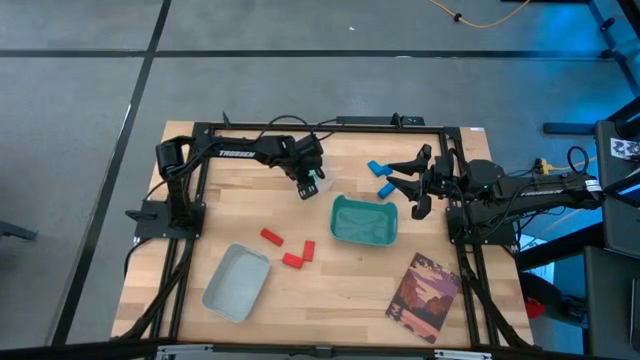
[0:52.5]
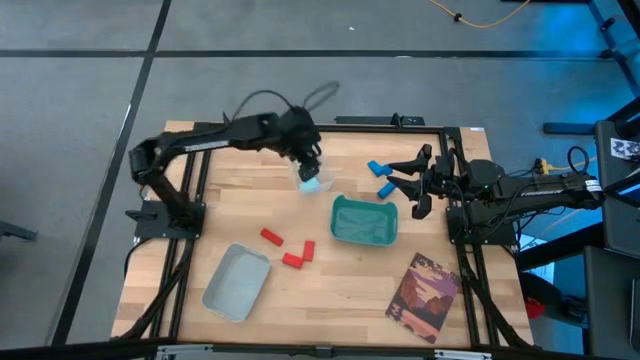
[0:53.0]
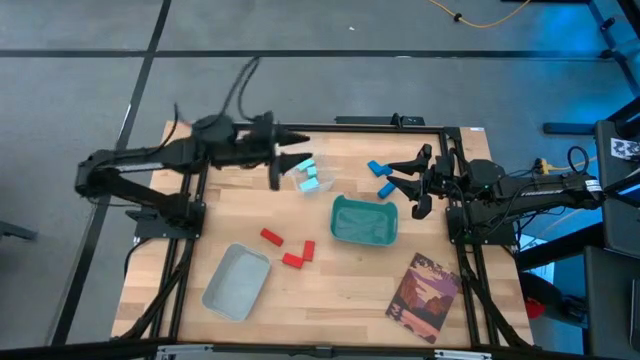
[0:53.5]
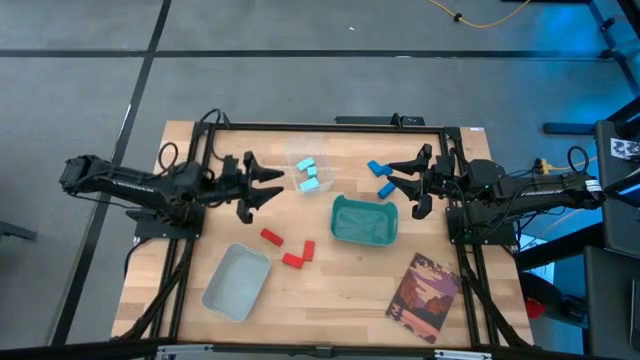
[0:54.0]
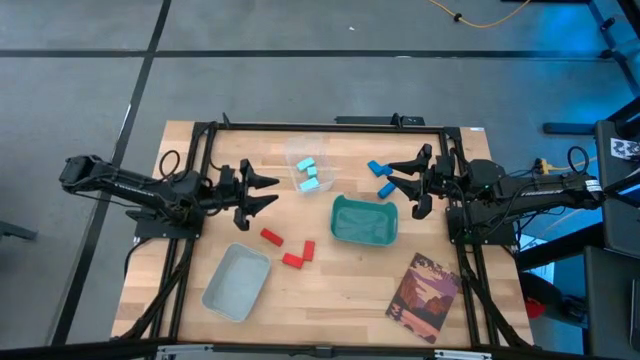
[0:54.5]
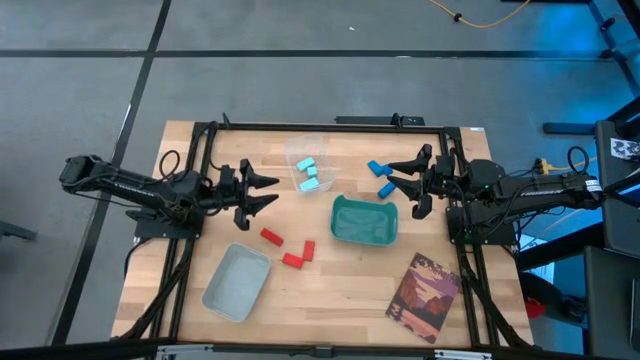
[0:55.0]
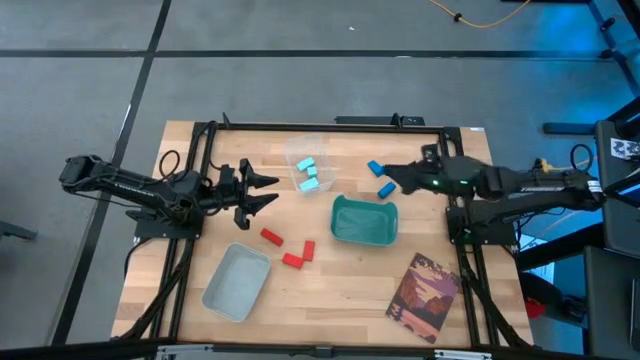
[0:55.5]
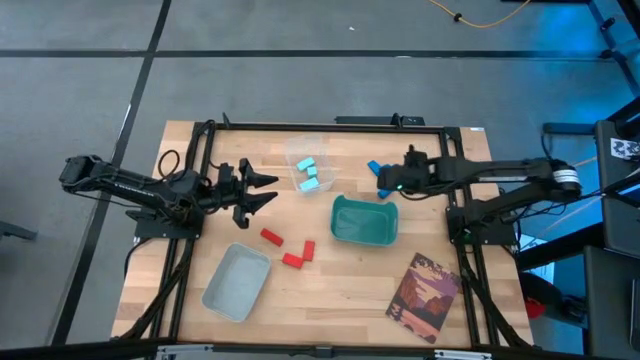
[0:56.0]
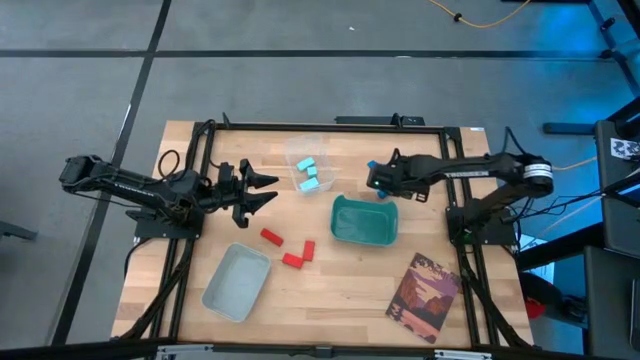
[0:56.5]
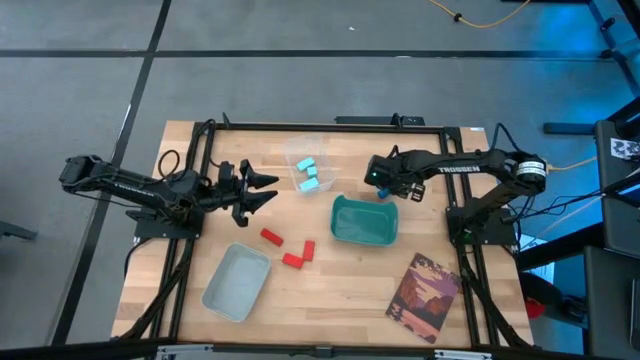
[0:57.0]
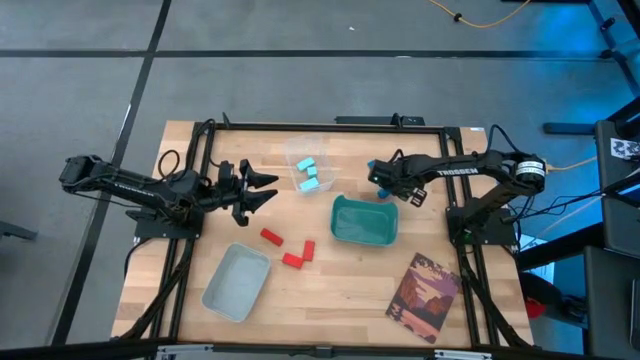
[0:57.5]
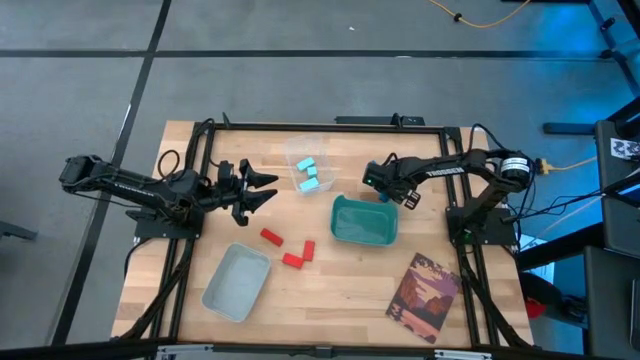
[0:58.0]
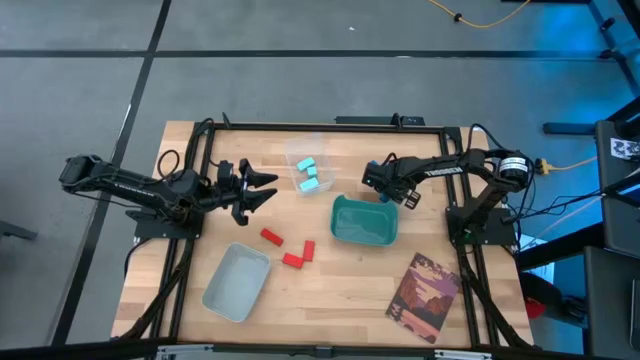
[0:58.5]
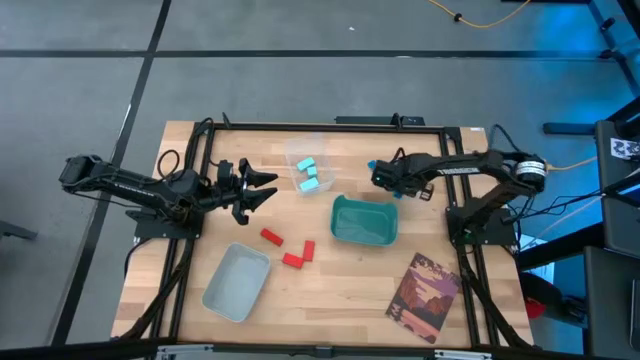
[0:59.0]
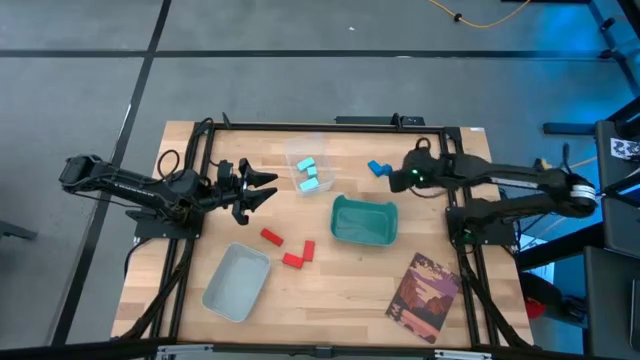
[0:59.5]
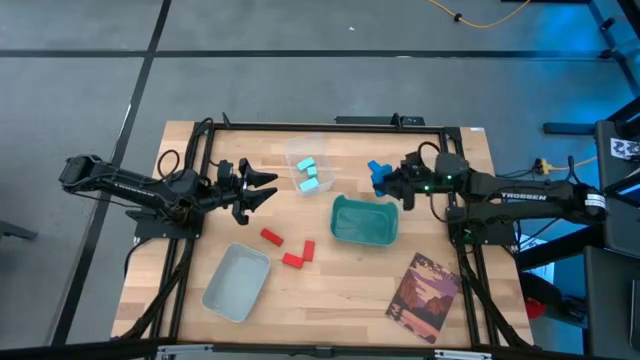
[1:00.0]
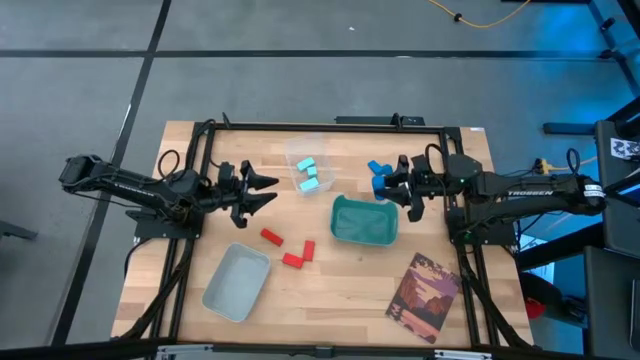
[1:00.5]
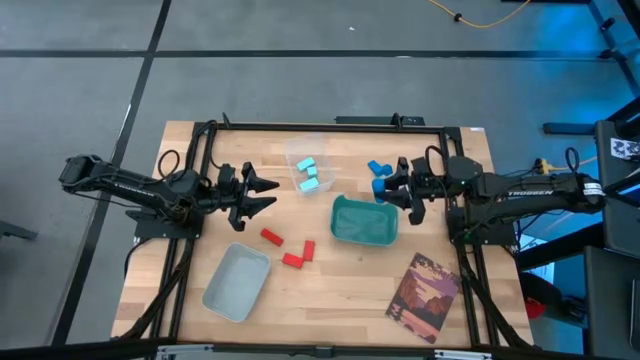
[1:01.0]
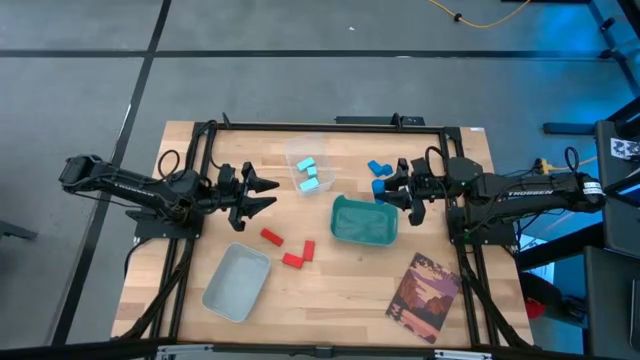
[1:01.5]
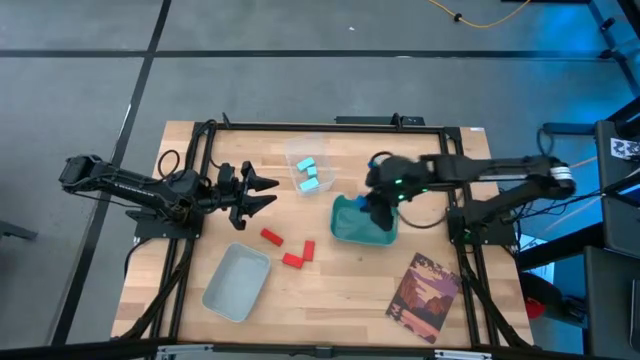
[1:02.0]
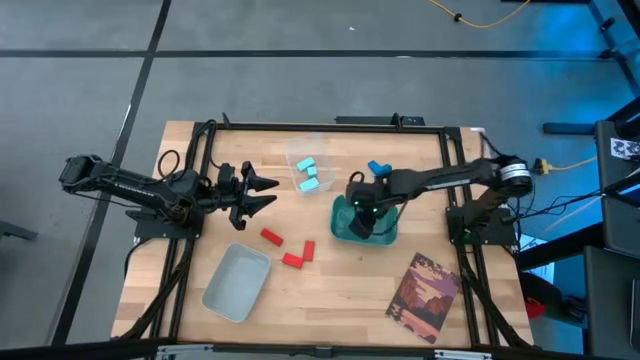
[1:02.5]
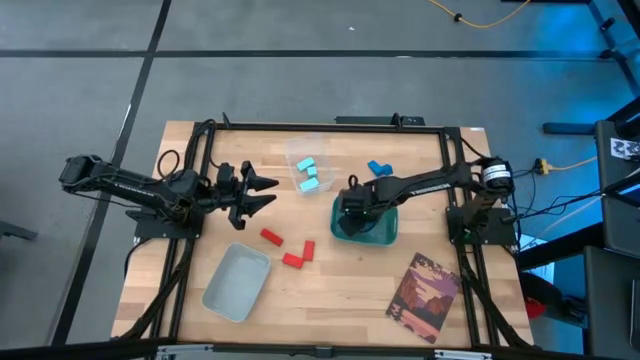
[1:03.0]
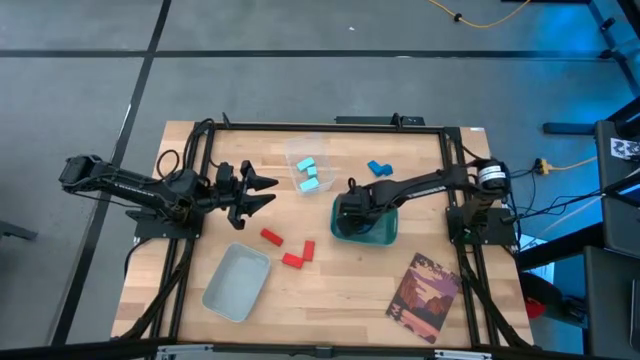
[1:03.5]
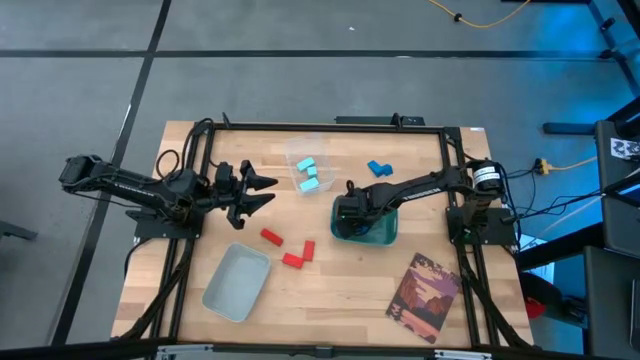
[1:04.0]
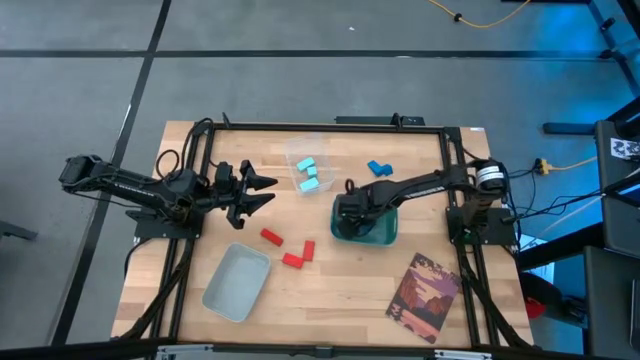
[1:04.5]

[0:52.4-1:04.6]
Task: Sort & place blocks by color
Put the blue block into the green bin

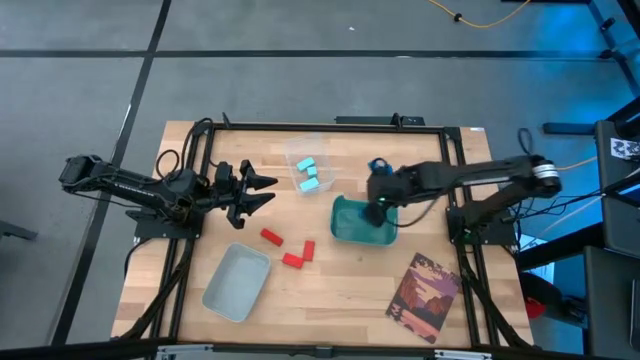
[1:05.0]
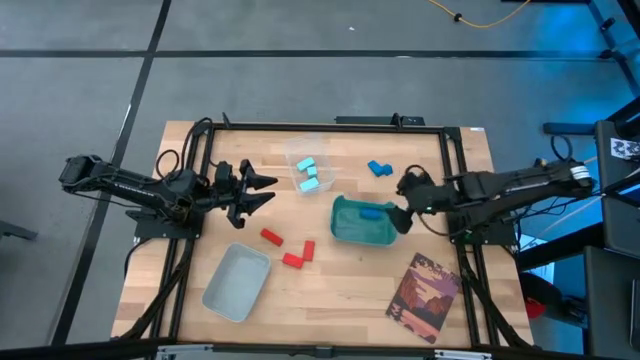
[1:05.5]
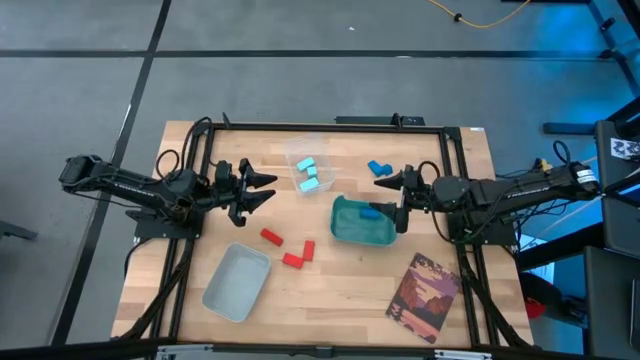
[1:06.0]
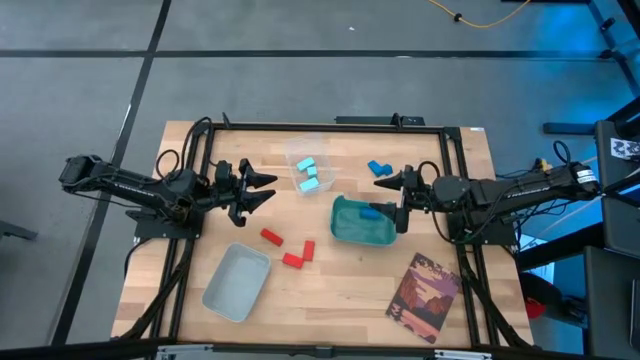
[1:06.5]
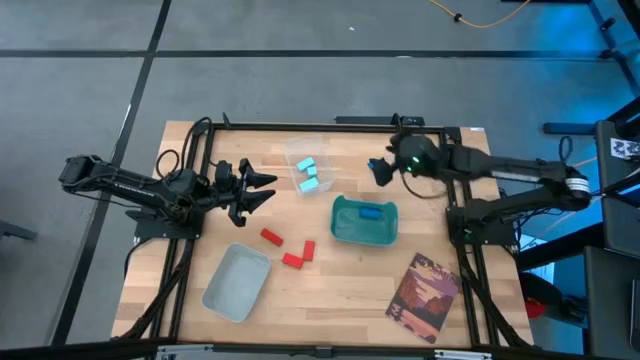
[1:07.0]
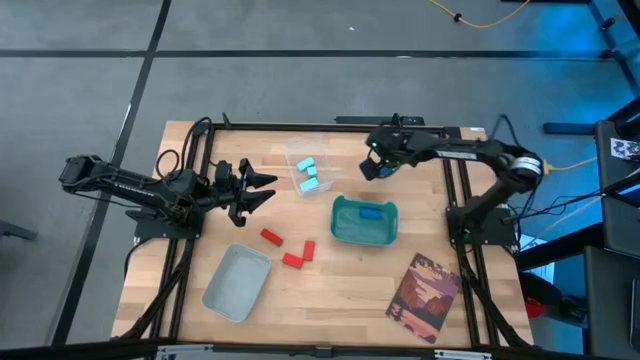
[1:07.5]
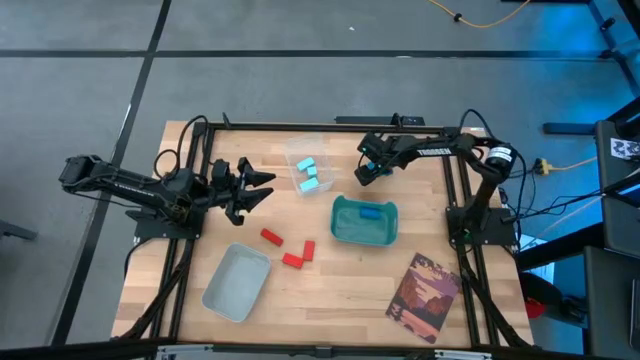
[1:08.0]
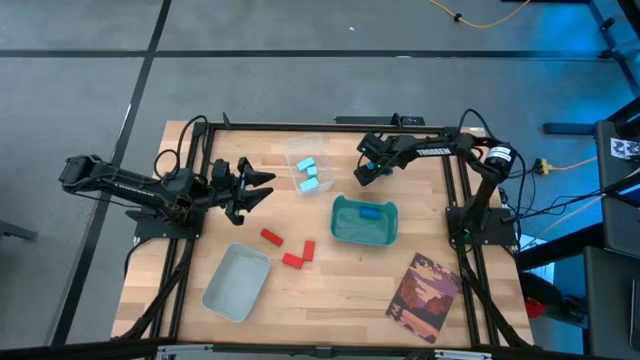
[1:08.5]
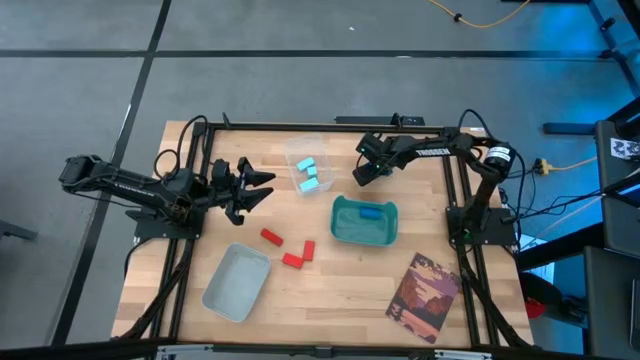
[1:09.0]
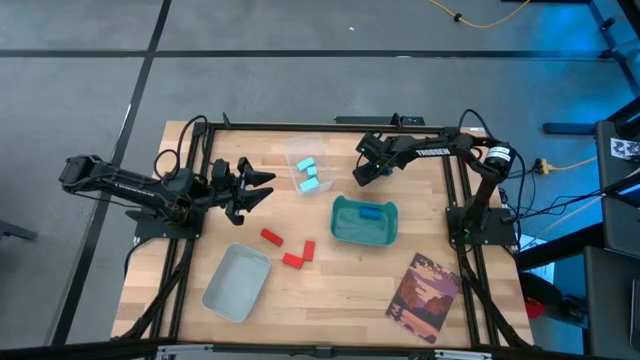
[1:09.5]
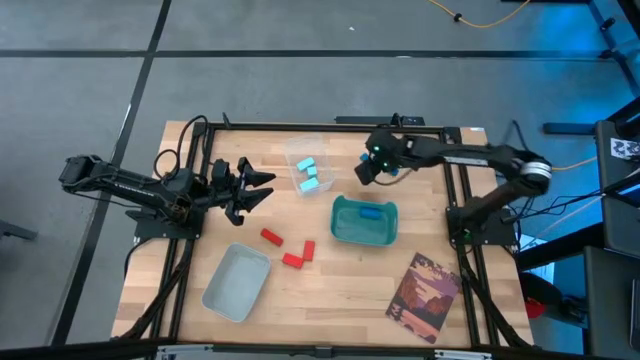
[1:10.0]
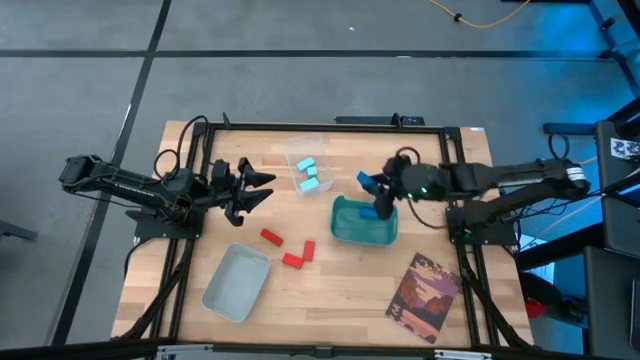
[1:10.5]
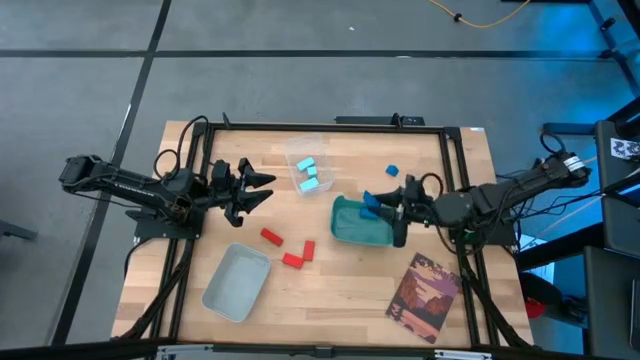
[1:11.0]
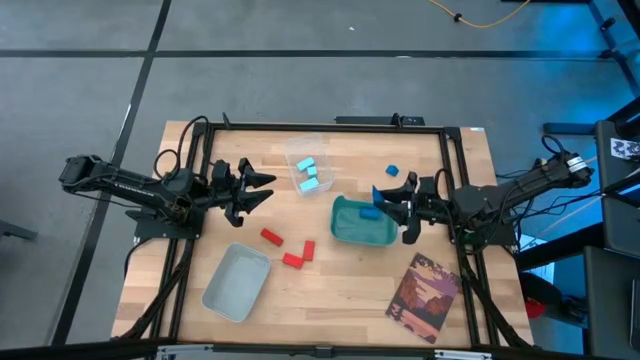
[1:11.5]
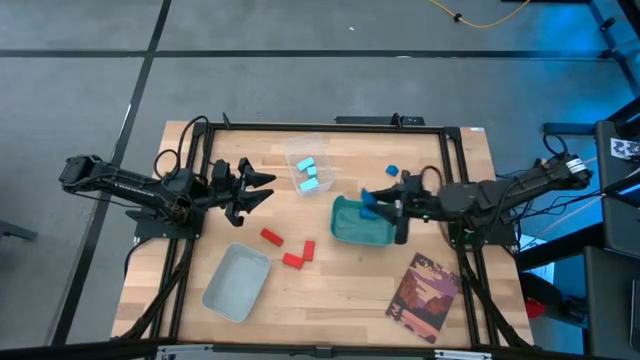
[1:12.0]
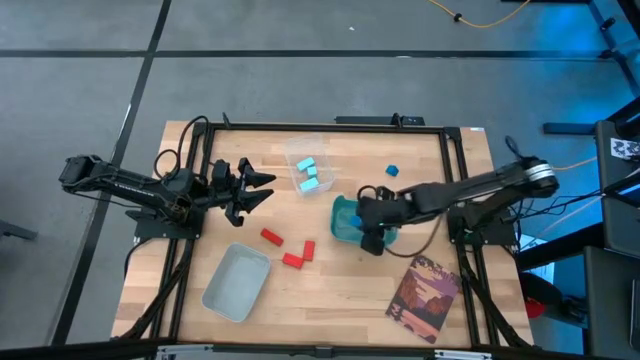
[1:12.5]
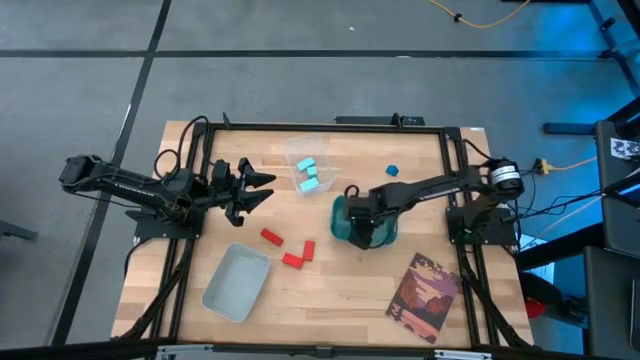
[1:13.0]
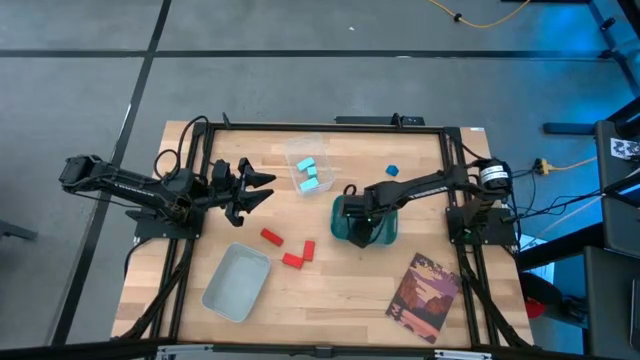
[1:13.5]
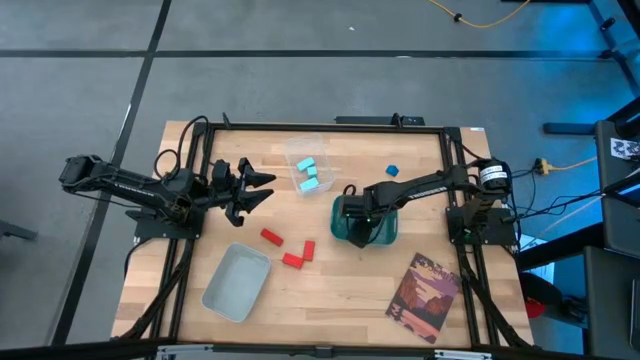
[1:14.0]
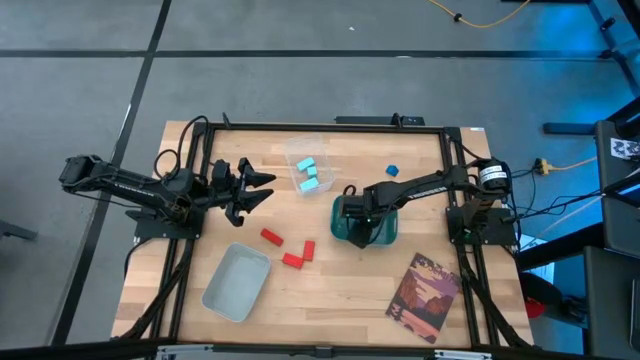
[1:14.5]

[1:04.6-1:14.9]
Put the blue block into the green bin
